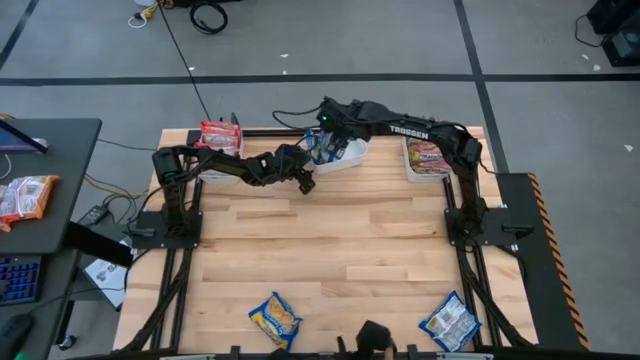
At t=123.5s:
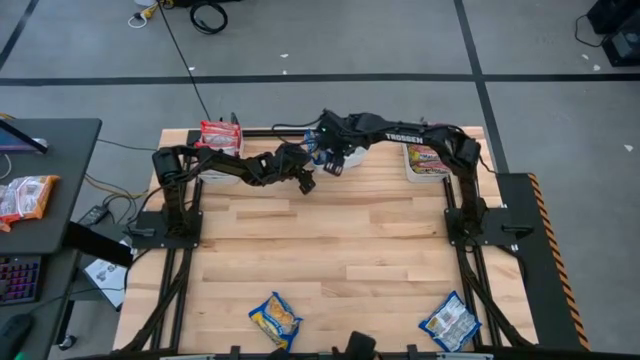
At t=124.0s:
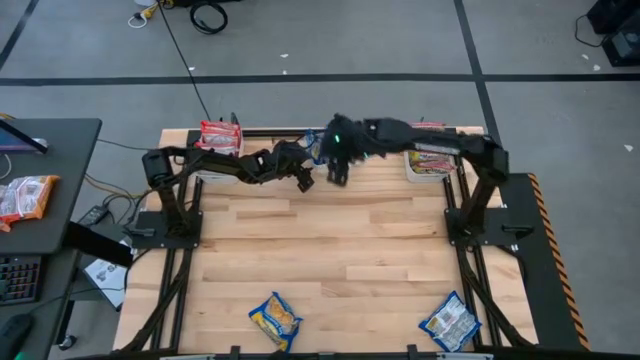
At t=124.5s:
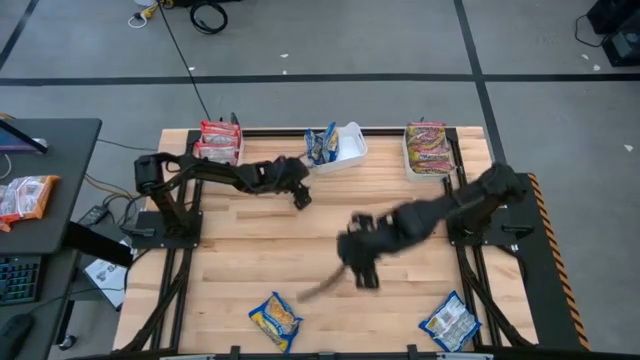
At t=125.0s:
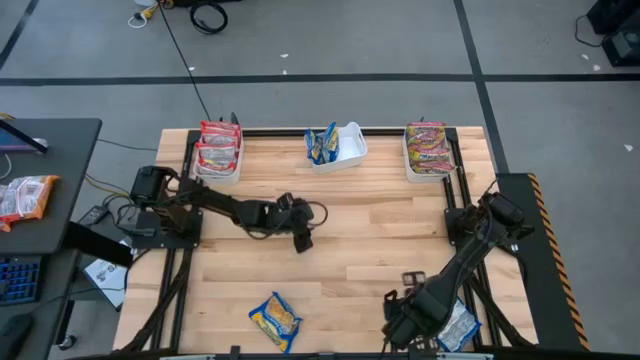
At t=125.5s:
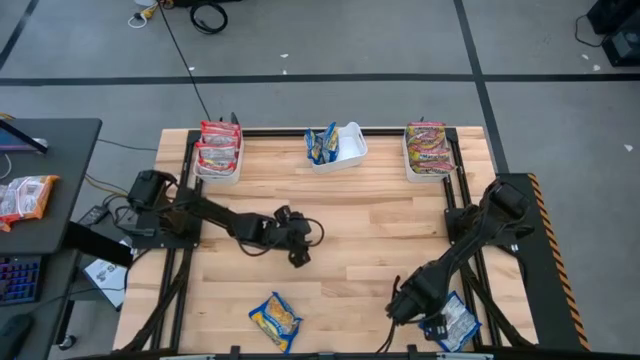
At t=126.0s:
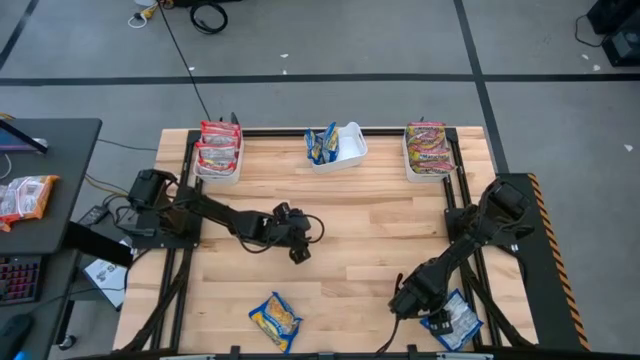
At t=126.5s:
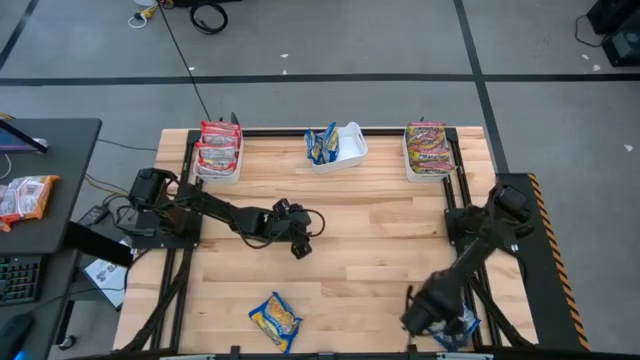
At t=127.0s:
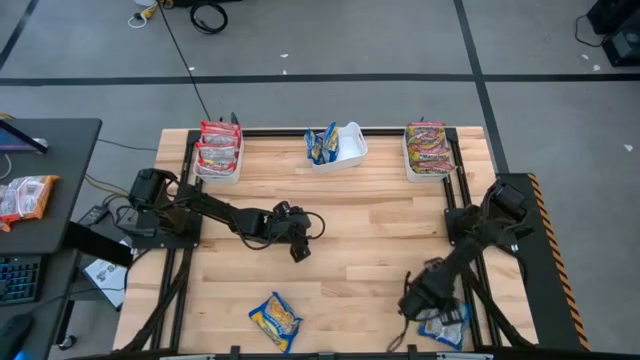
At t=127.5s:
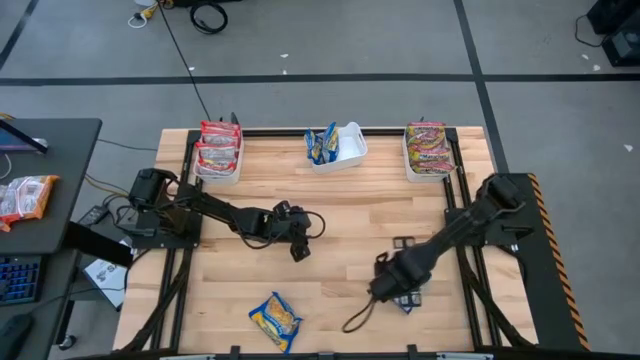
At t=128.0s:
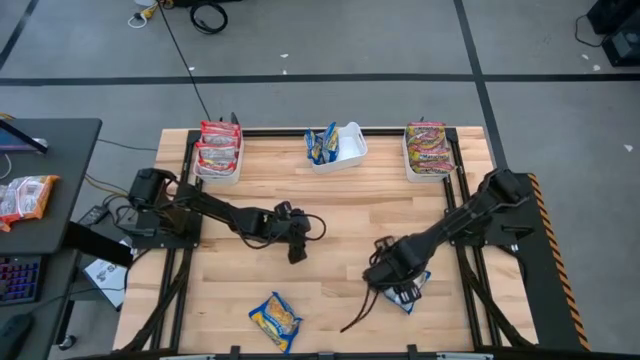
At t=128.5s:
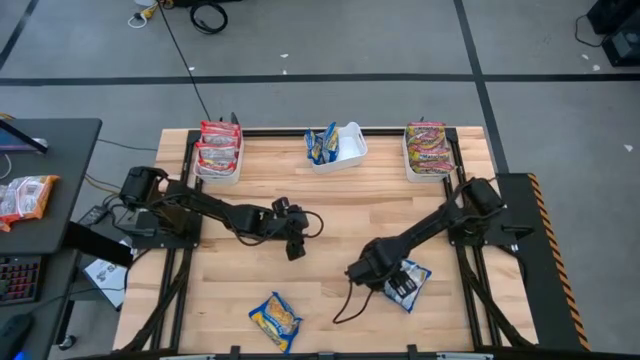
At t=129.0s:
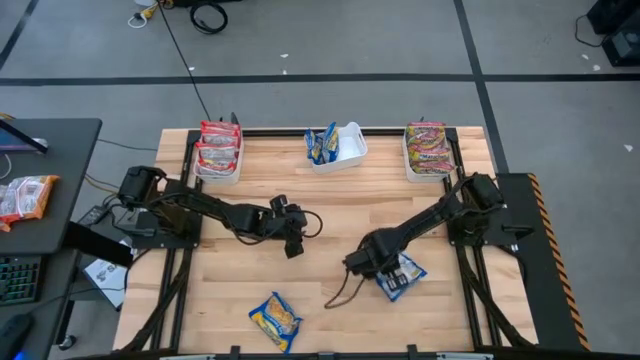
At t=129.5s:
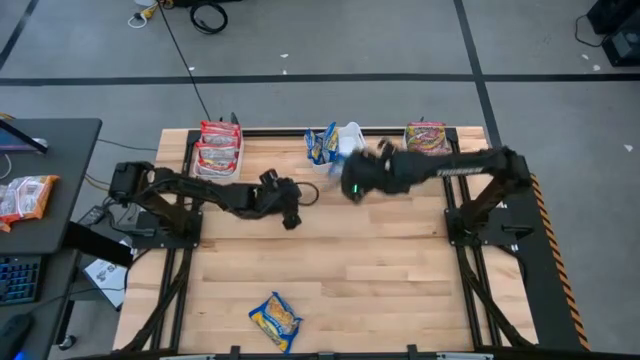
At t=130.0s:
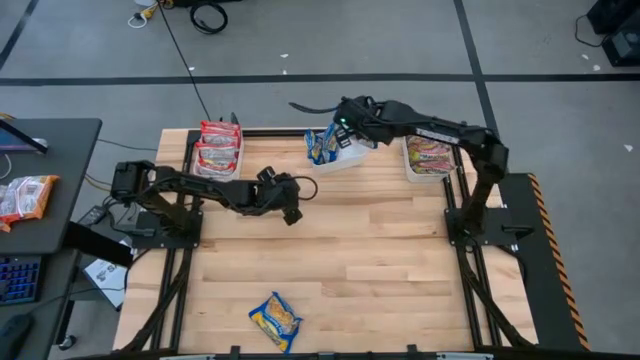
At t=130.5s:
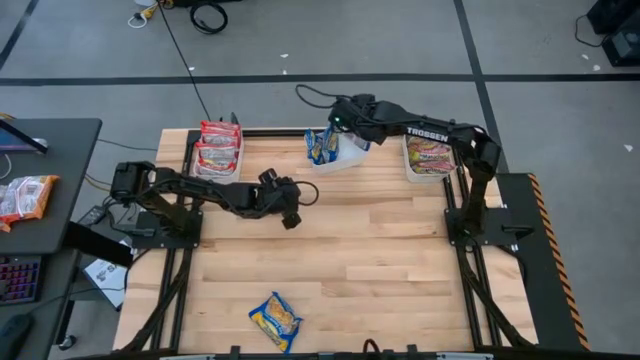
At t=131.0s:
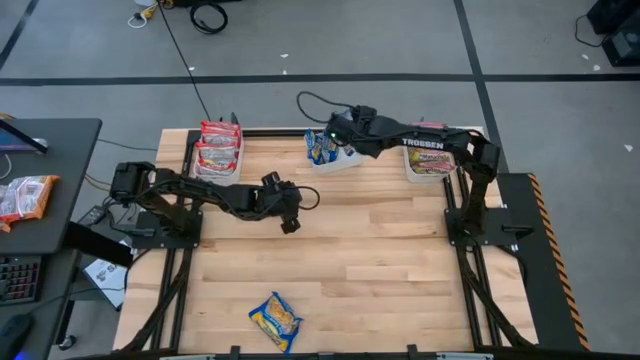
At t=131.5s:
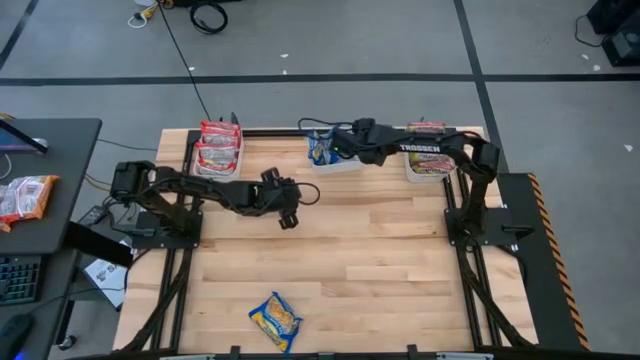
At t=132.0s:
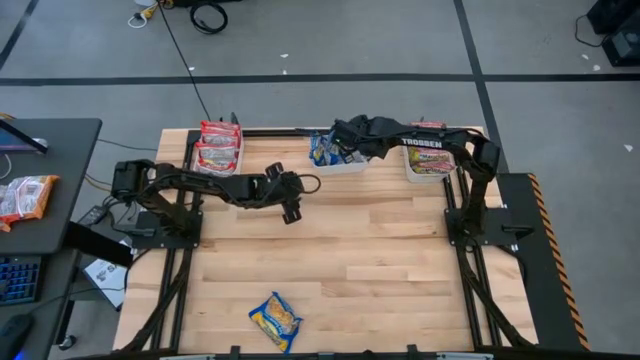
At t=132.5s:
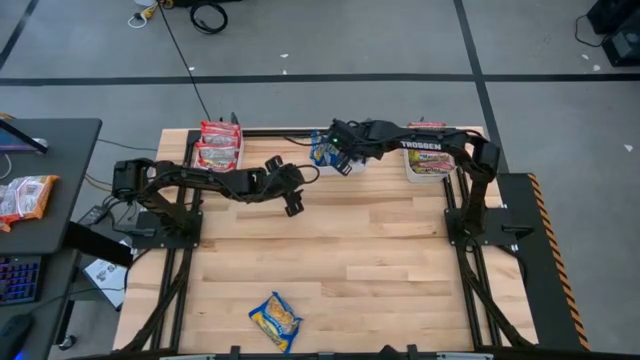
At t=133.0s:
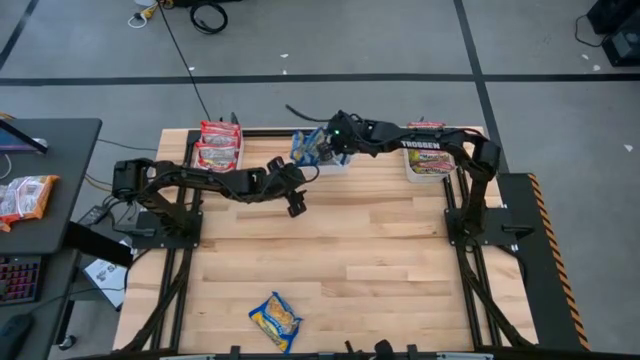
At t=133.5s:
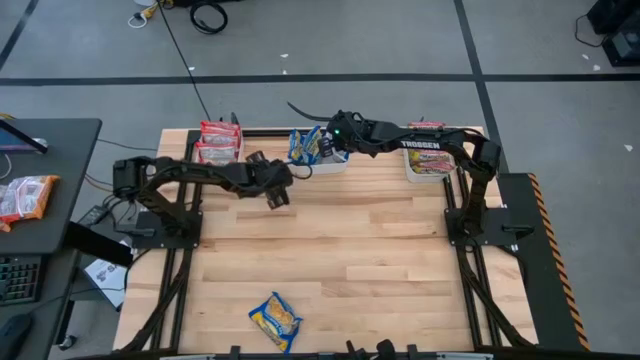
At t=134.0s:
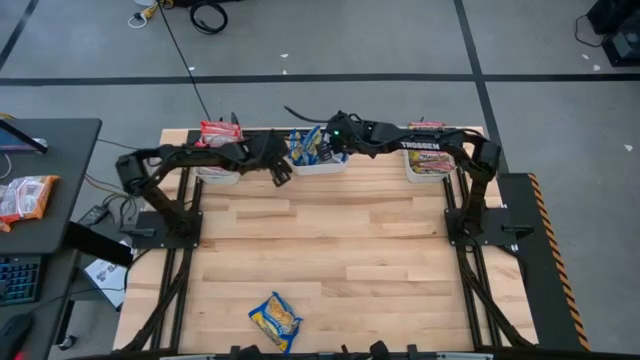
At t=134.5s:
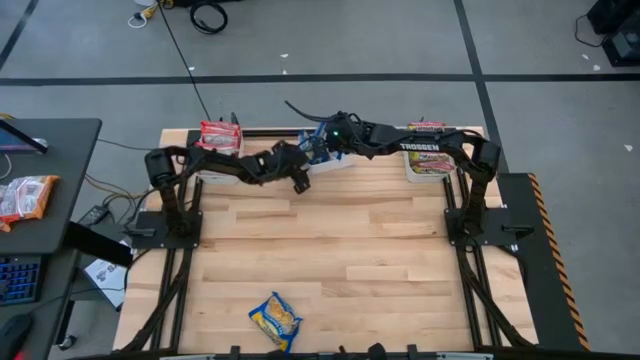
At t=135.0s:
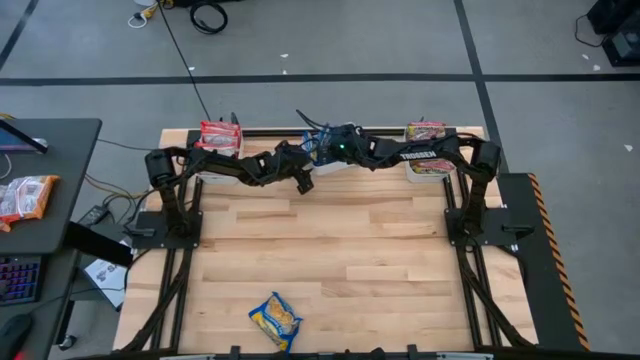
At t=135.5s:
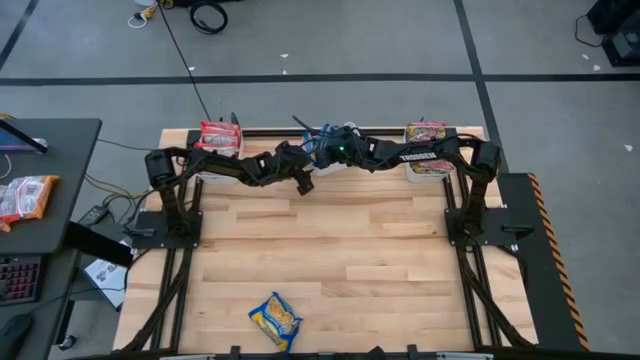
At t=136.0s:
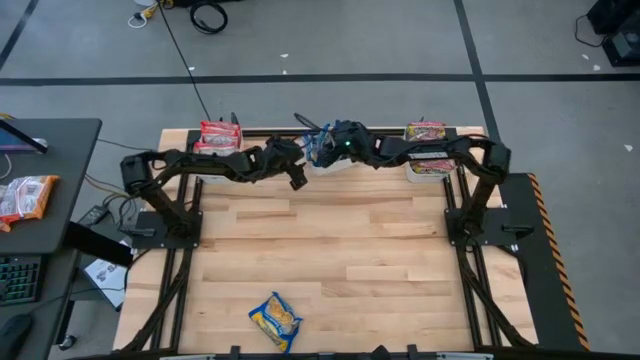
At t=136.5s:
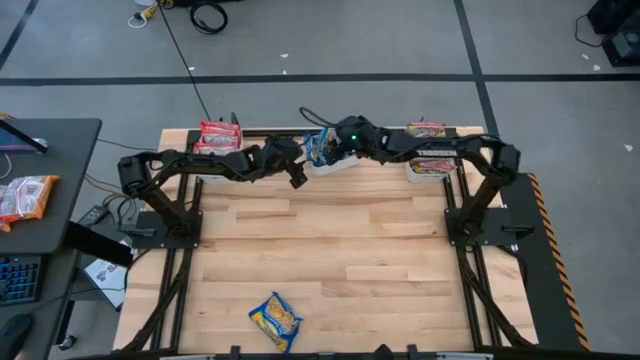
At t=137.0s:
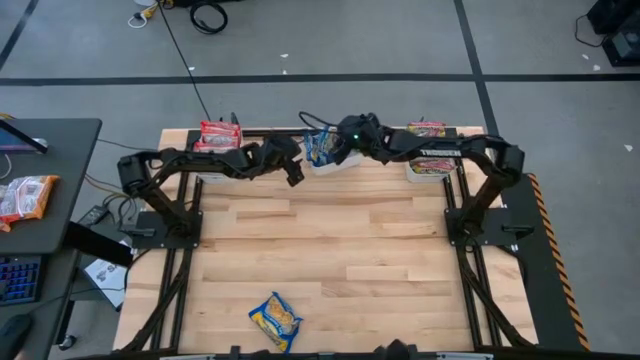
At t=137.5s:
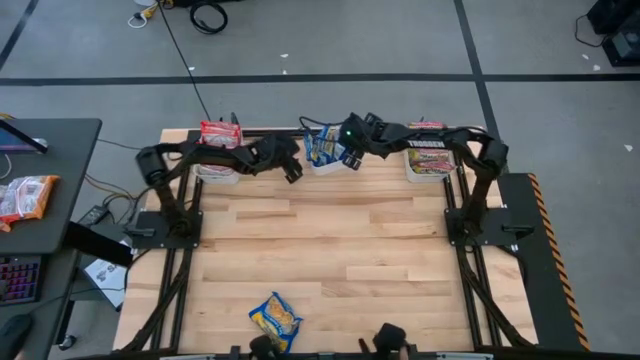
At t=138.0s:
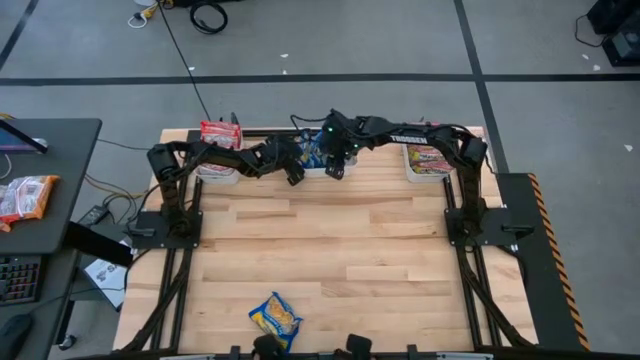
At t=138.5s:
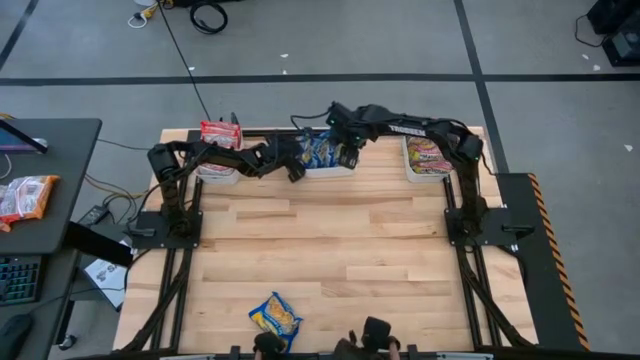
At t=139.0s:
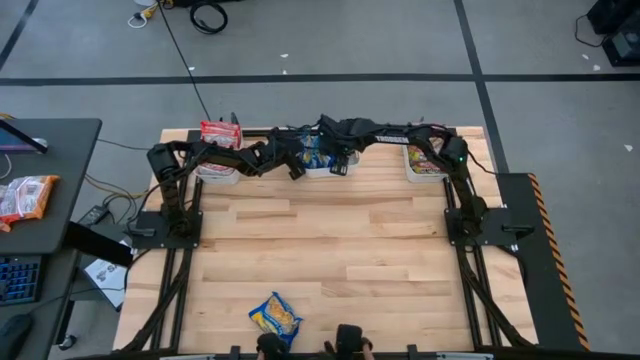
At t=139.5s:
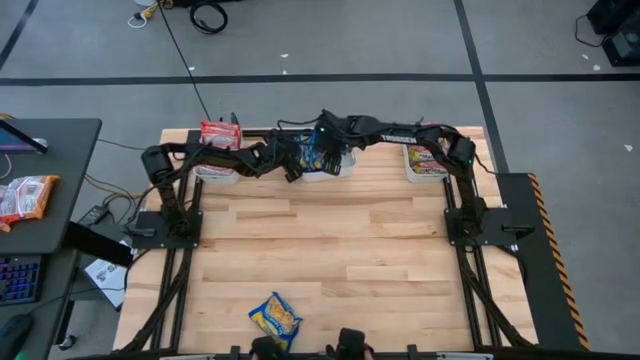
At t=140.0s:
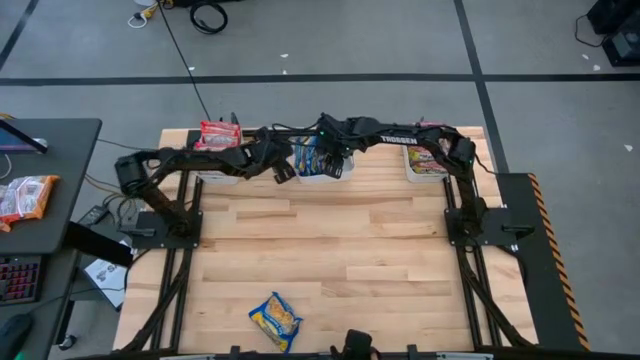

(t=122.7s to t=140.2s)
Task: Sort Maruchan noodles
Put the blue noodle pack into the middle white bin

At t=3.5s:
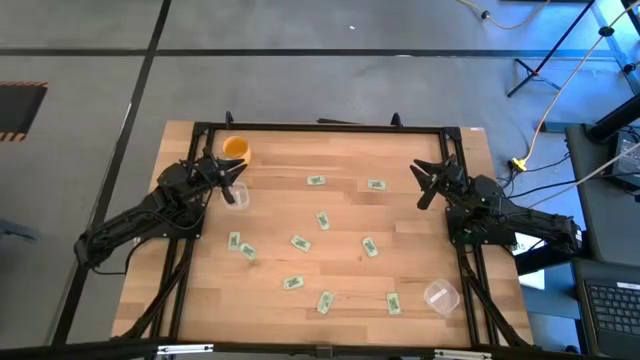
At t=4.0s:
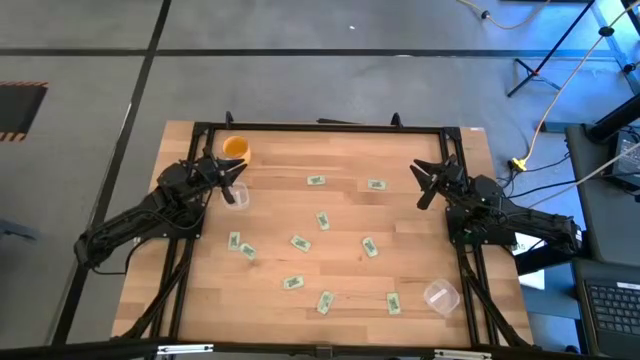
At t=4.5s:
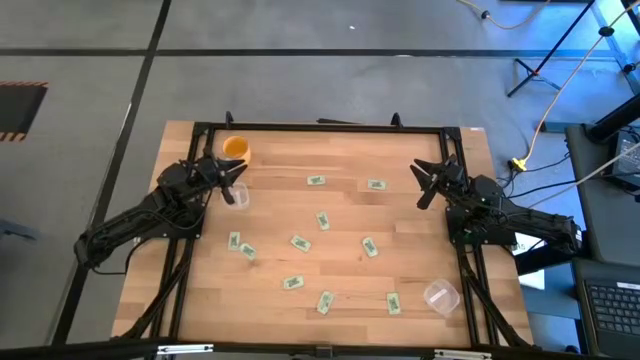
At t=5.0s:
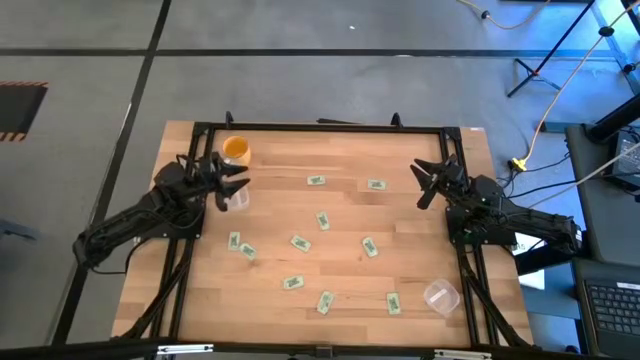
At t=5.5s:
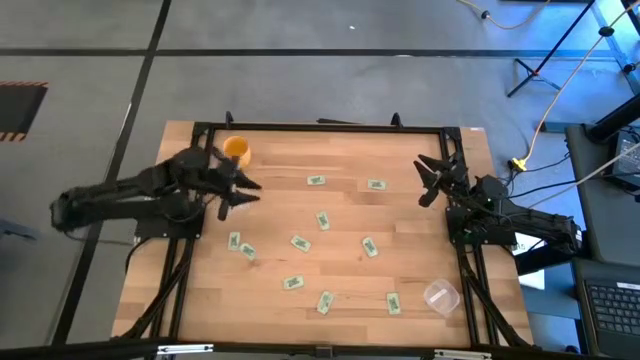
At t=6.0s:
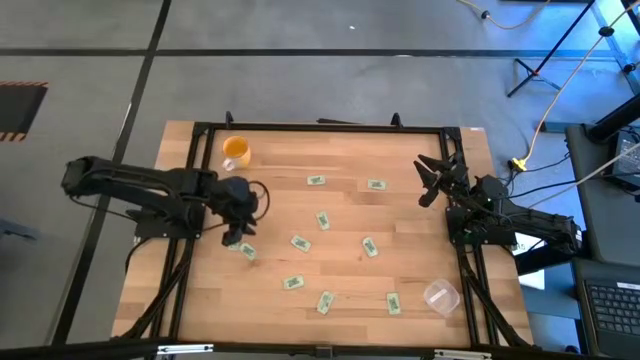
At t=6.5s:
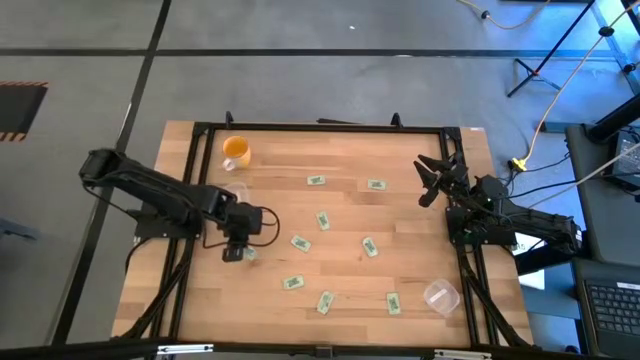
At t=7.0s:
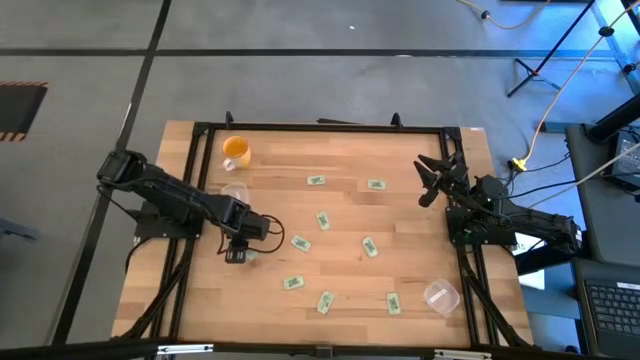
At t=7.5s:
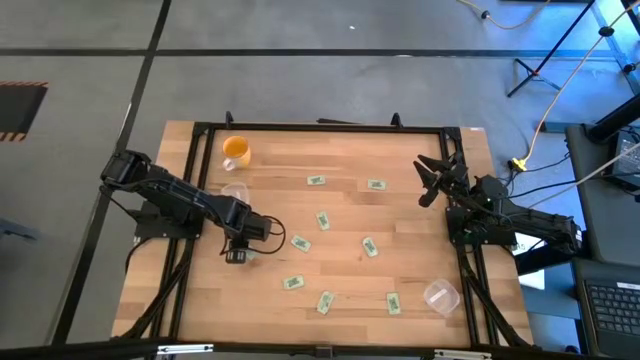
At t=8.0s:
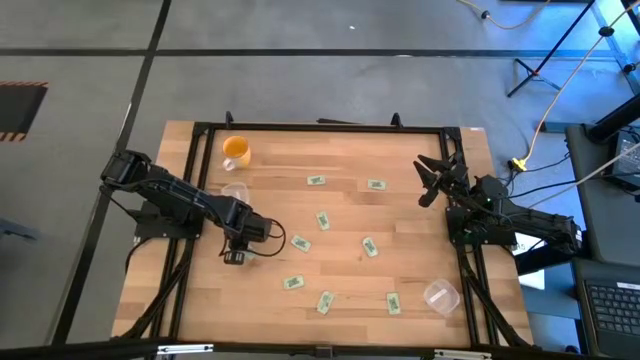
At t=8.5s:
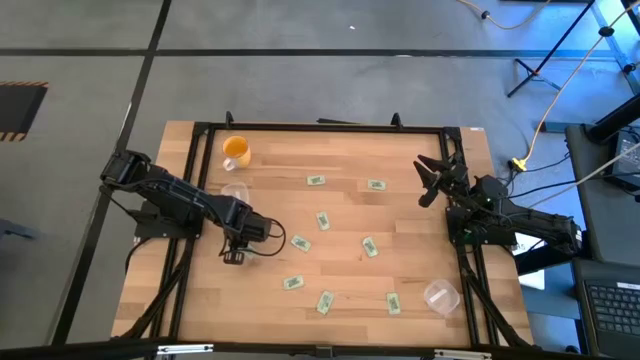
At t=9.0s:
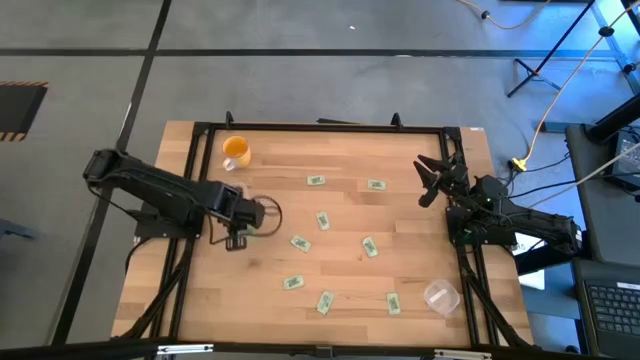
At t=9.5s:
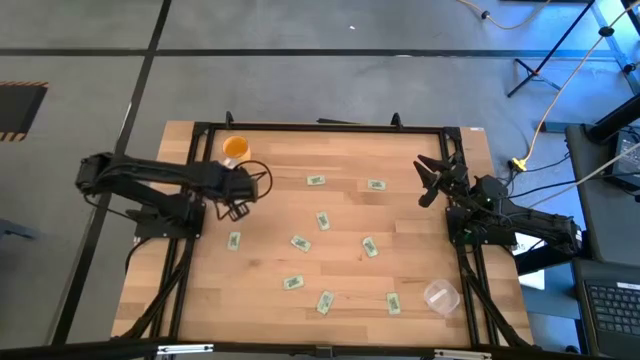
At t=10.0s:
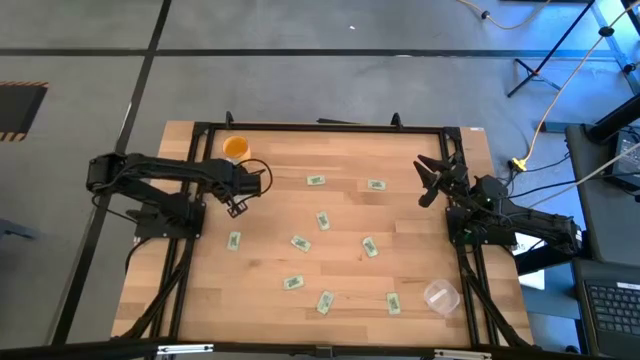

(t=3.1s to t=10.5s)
Task: Pick and place items into bin
Put the green stevia packet into the top transparent bin
